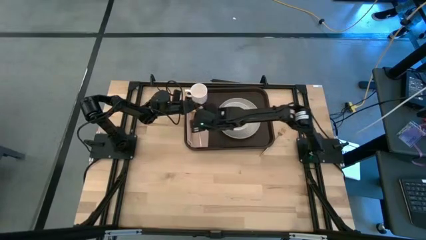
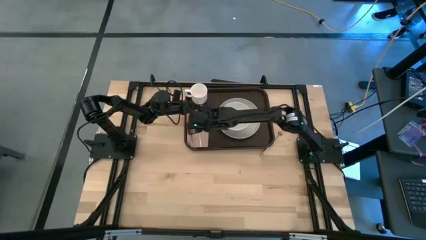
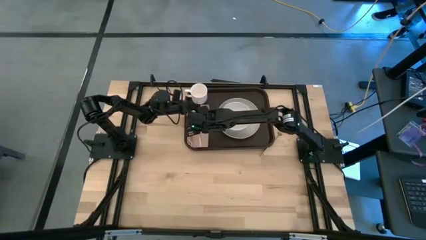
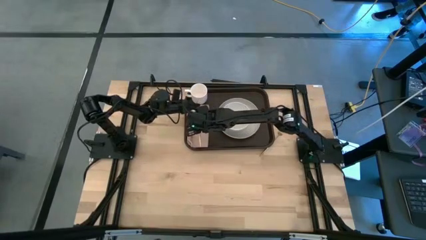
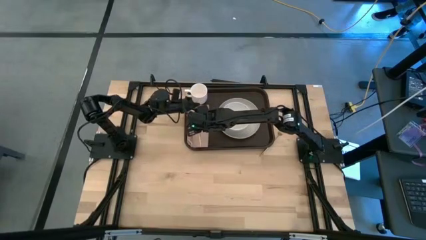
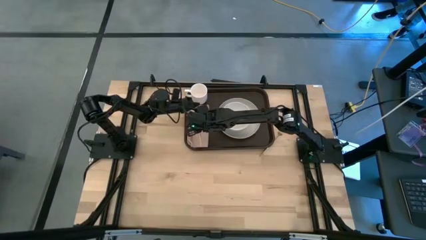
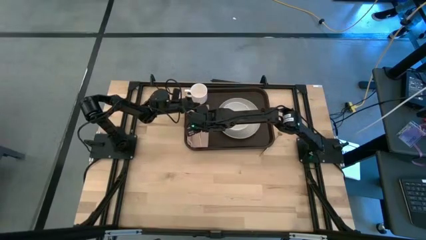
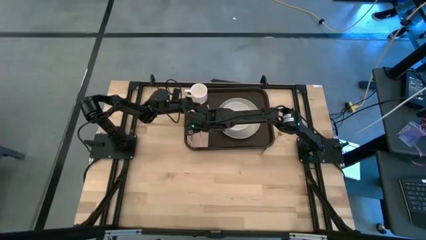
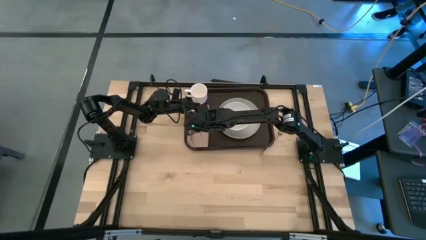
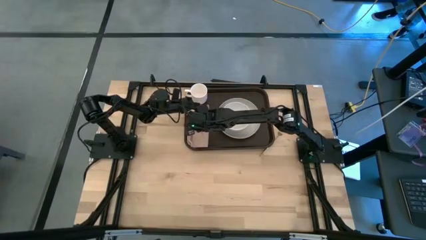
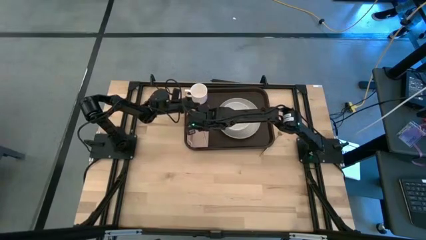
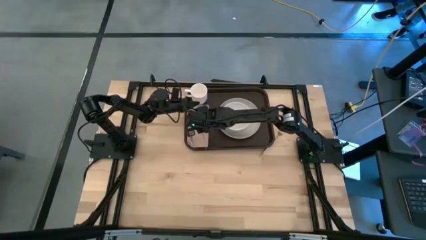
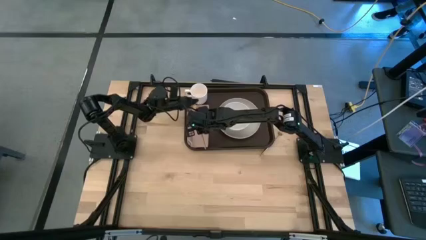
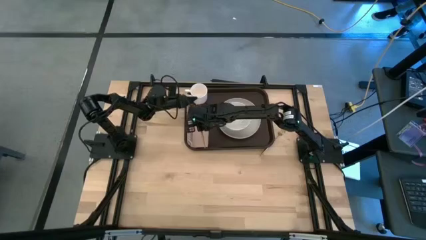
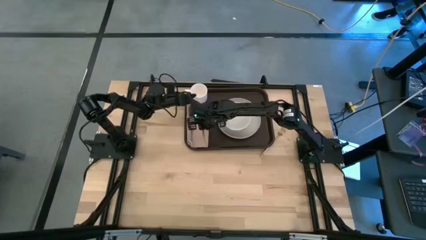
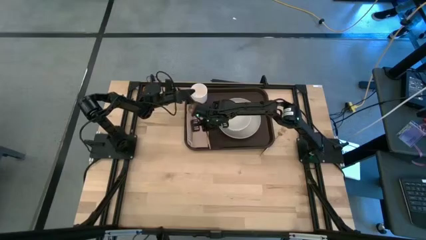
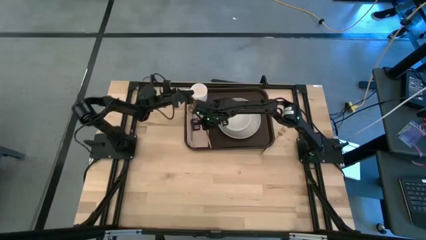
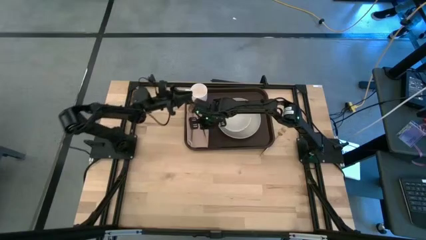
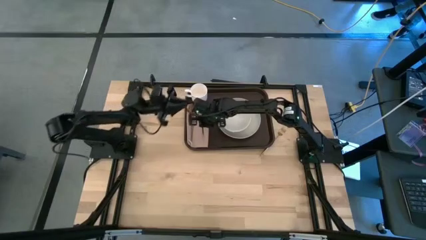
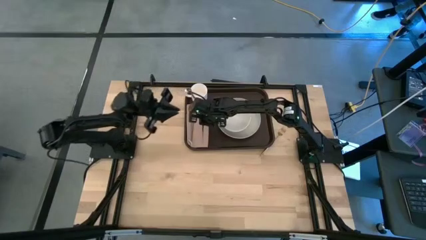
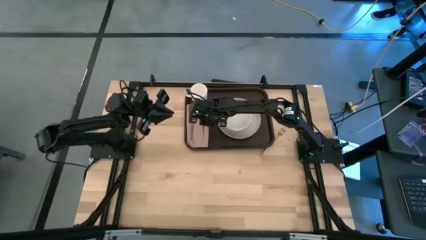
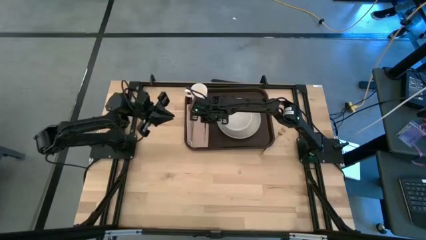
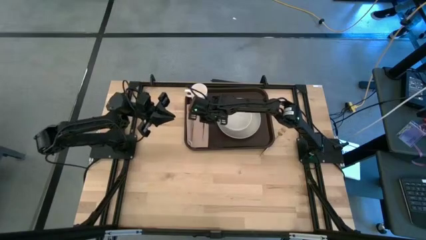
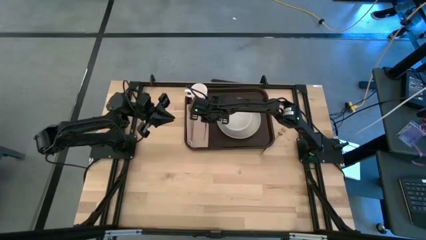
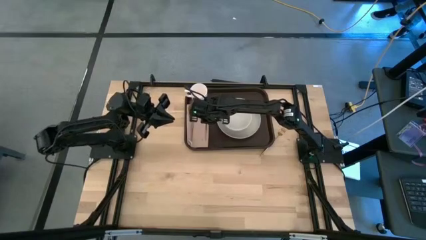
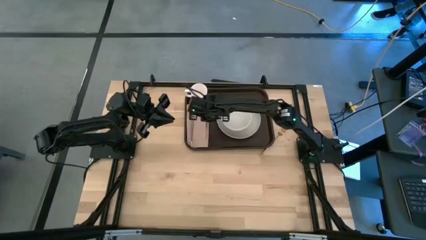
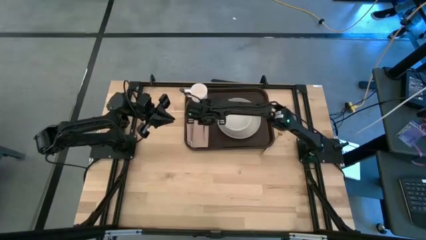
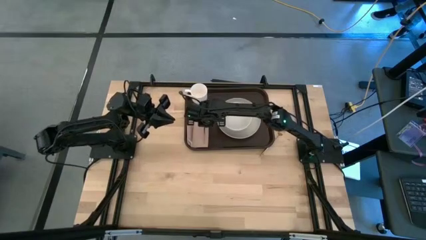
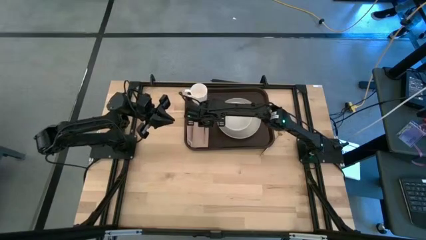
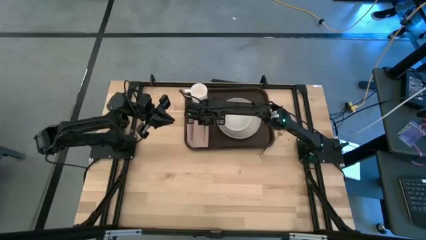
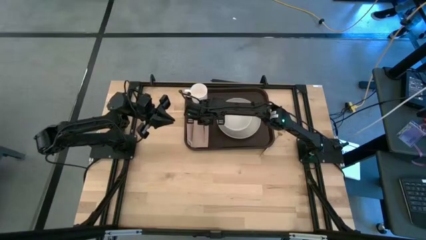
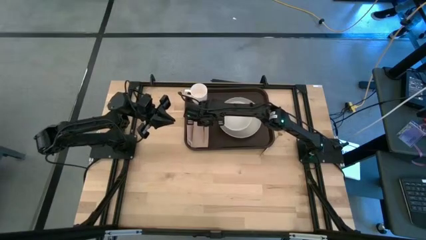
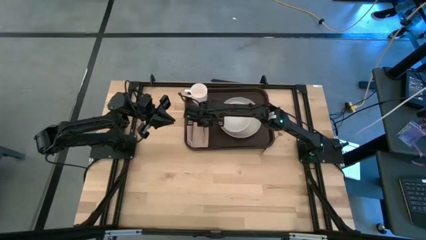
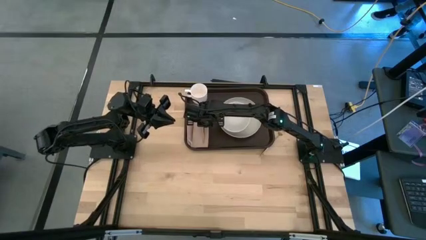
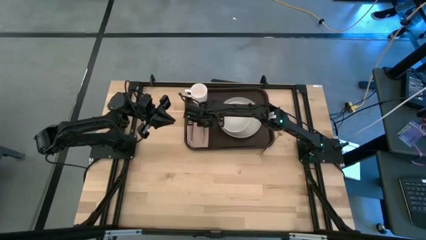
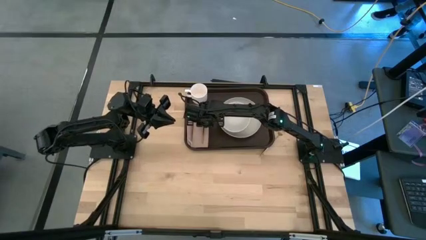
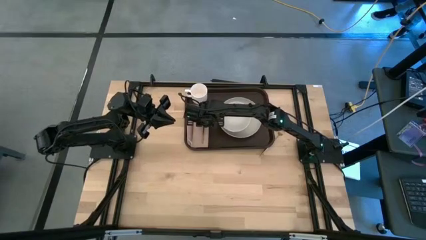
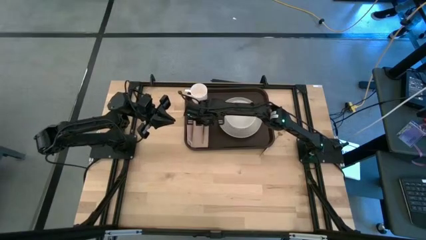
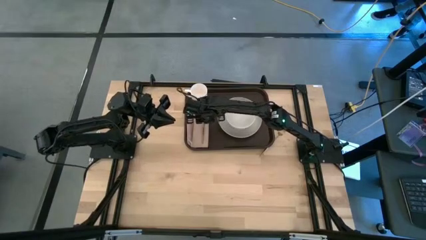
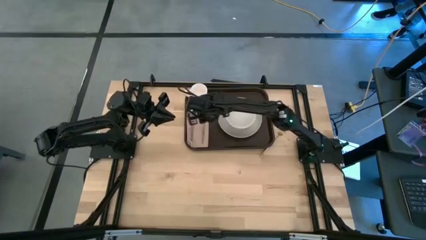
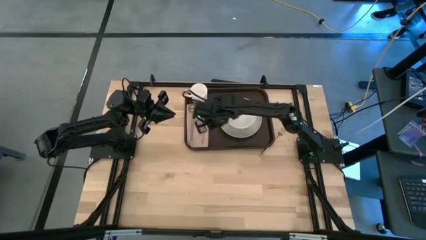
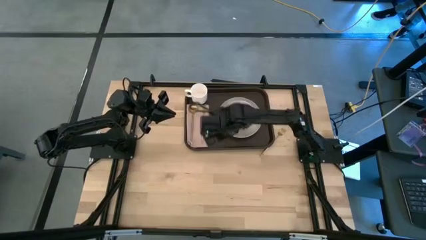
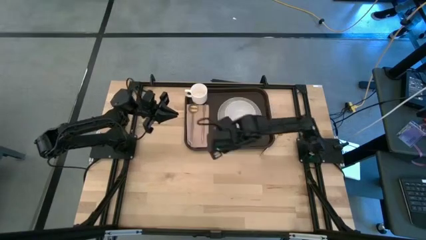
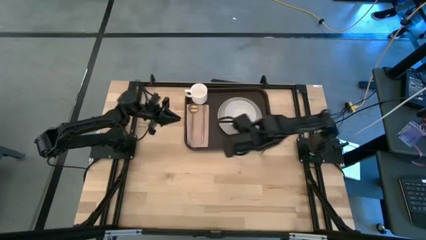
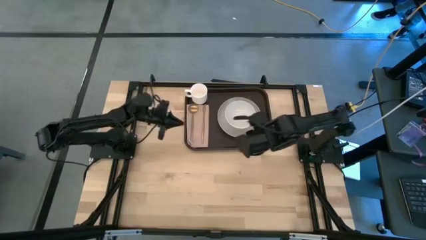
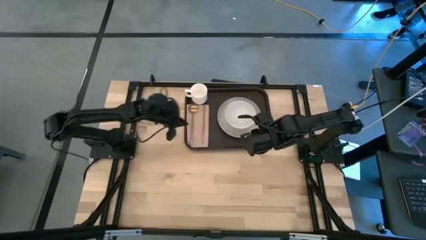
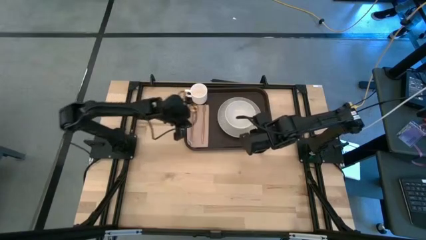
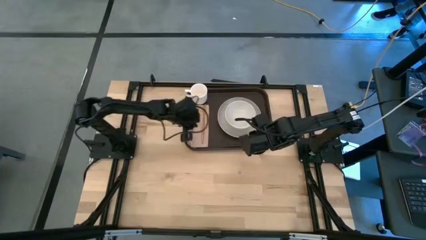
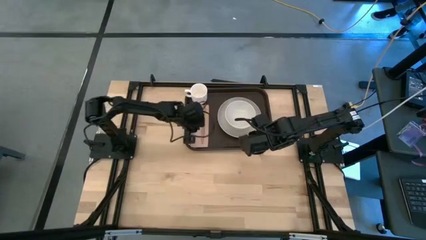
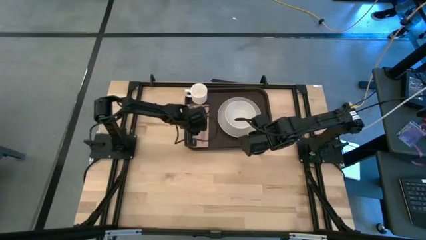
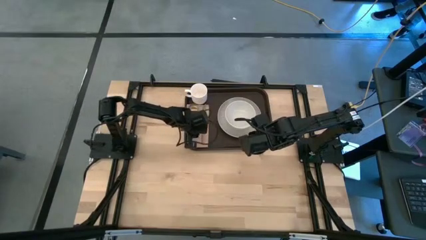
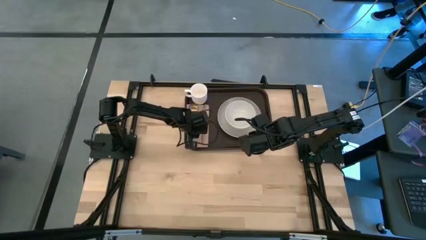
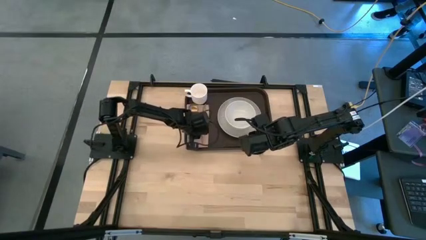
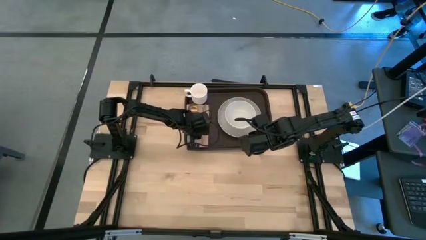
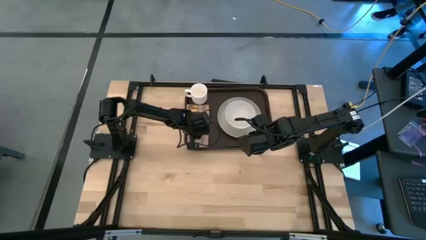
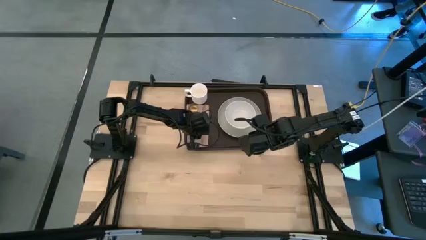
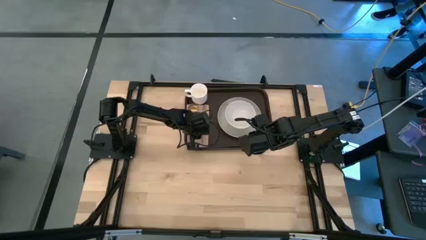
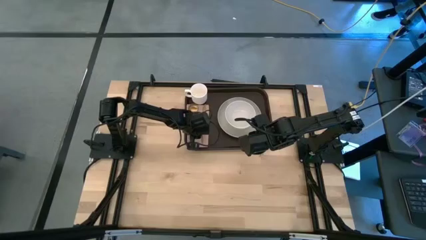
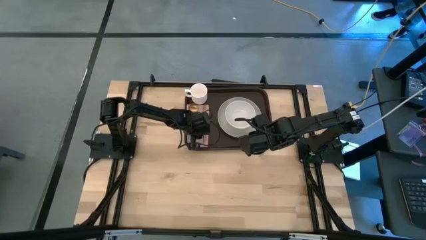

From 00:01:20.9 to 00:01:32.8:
Task: Set up tray
Put the gold knife on the light brown napkin to the right of the gold spoon

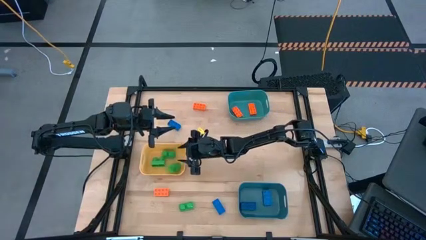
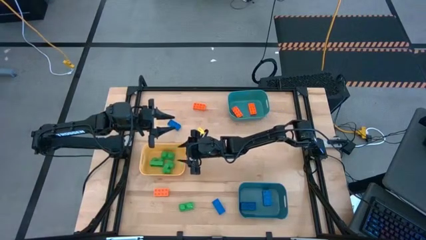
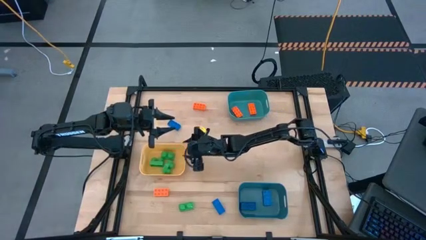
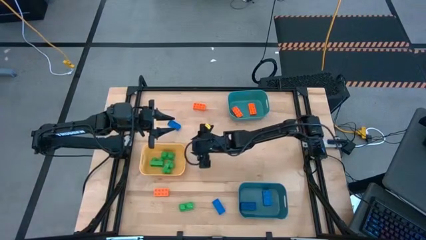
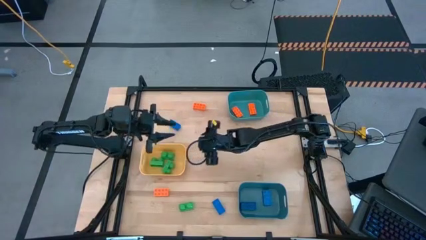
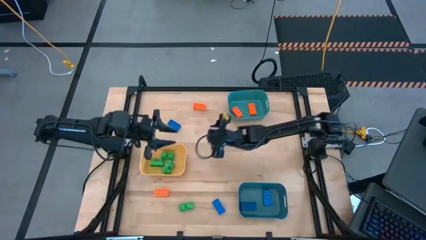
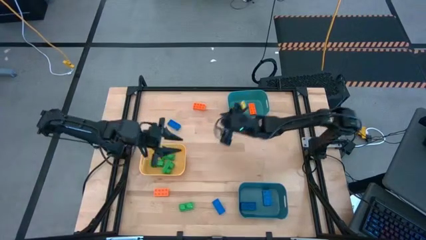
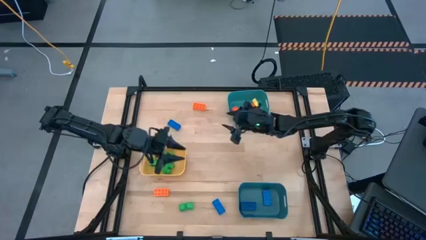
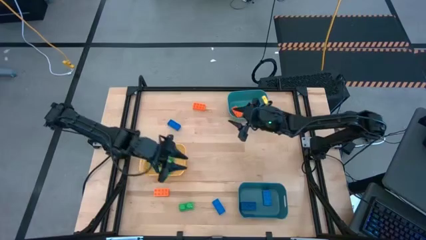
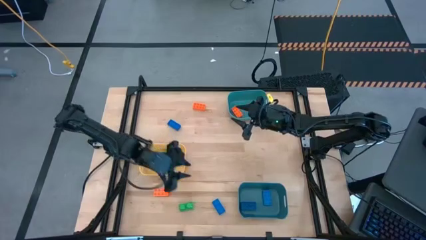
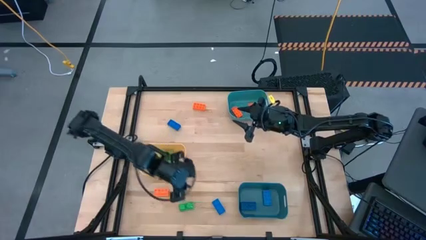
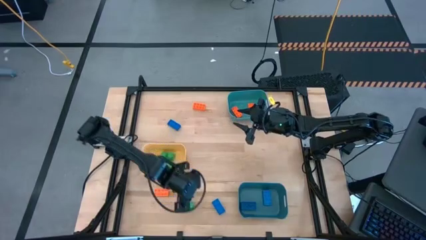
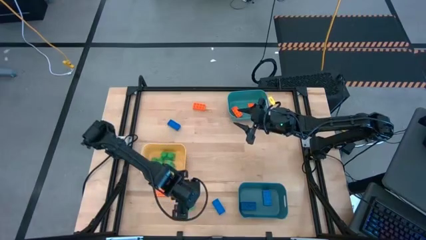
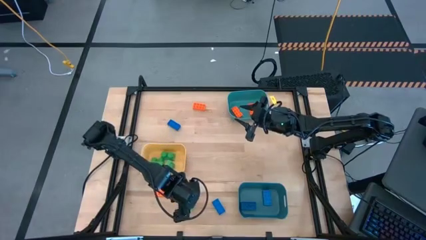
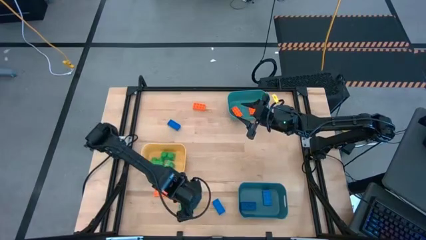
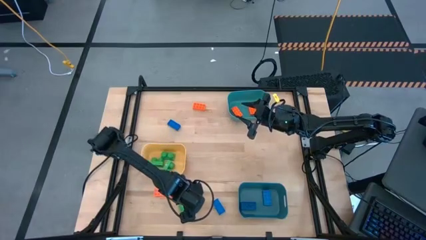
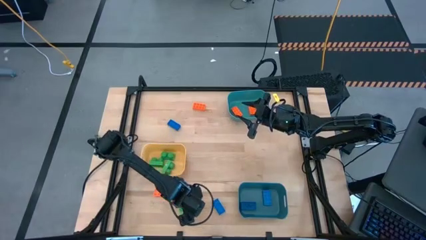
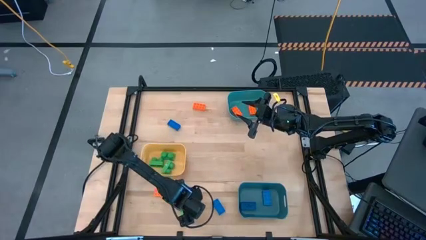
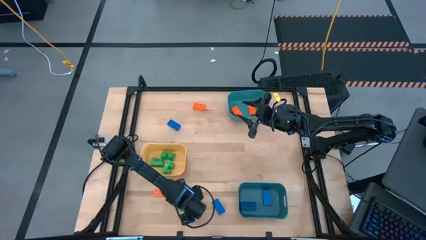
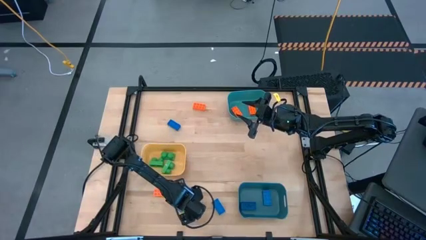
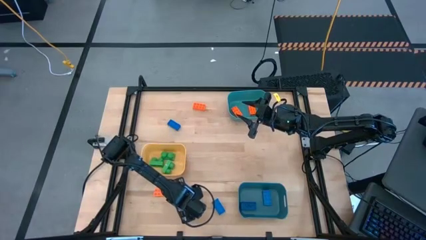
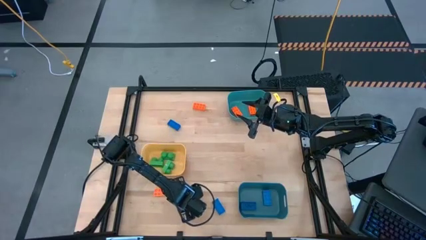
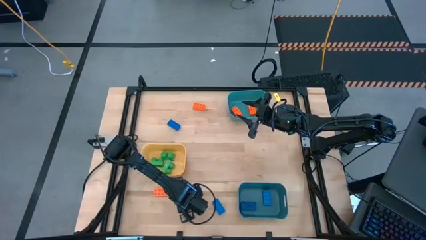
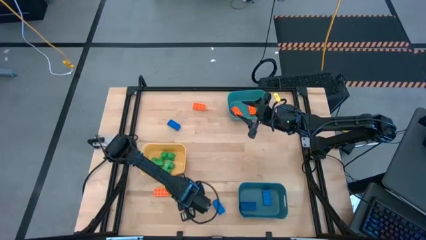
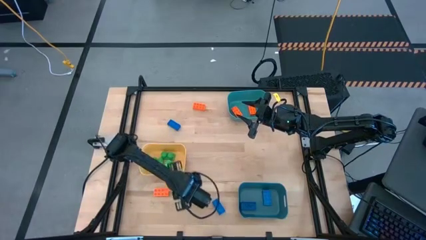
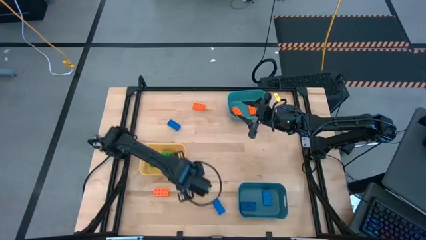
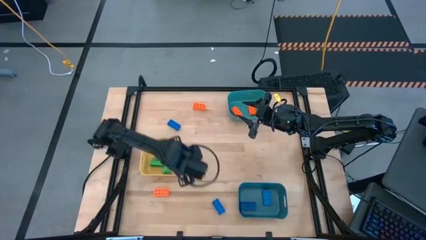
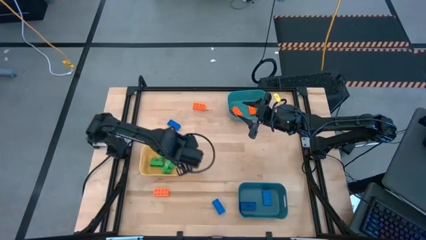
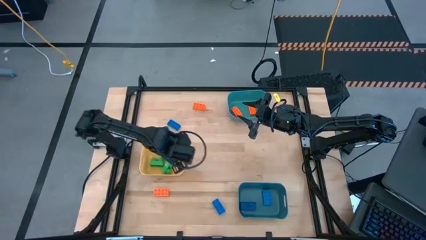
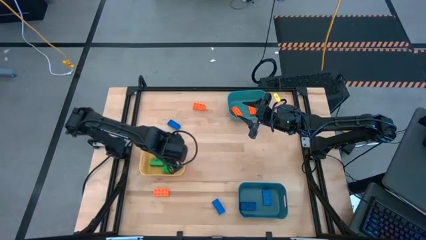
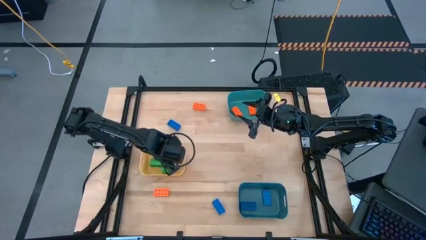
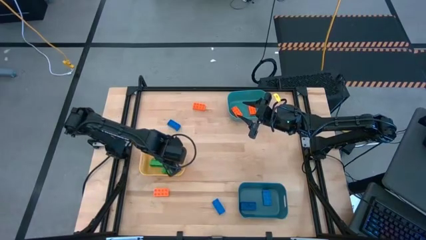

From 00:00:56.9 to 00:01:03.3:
Task: Sort & place blocks by color
Put the green game piece into the yellow bin
